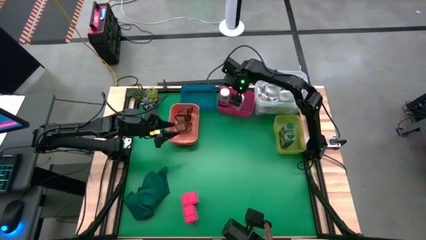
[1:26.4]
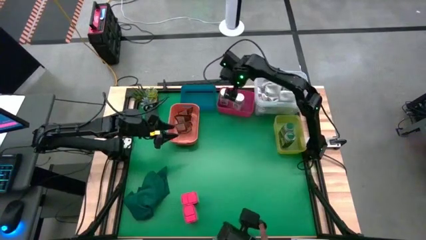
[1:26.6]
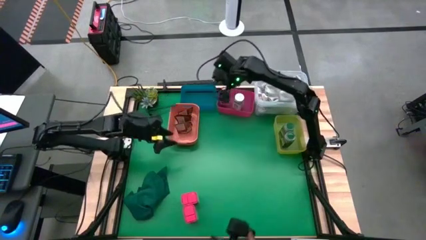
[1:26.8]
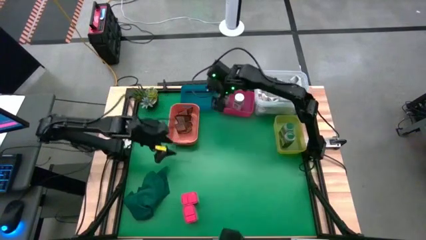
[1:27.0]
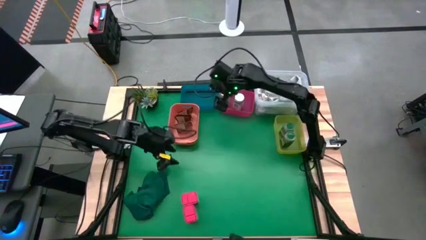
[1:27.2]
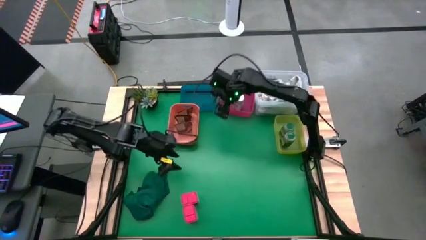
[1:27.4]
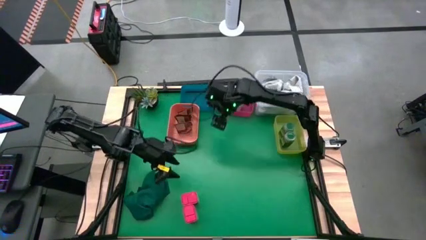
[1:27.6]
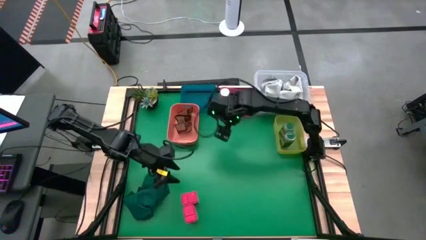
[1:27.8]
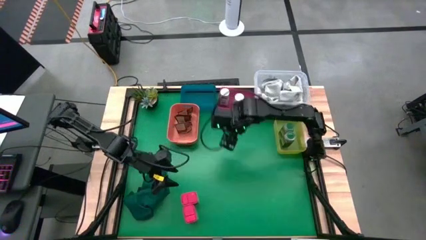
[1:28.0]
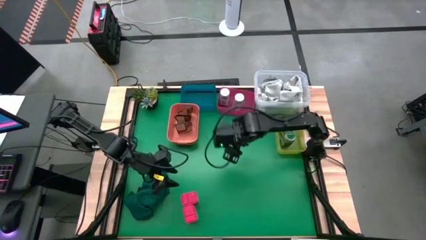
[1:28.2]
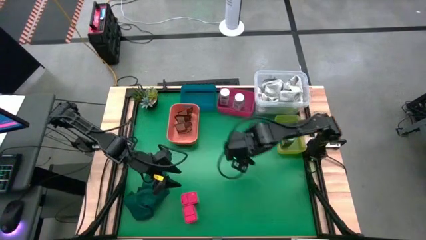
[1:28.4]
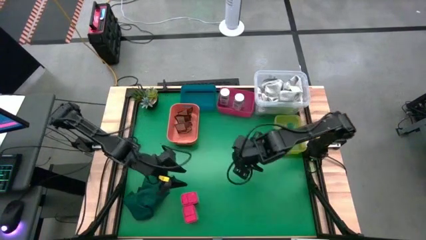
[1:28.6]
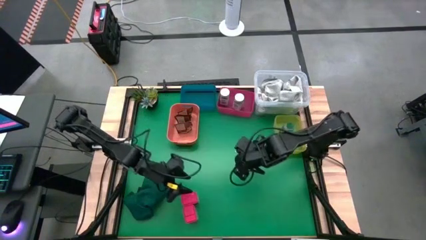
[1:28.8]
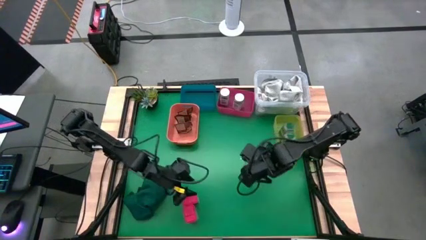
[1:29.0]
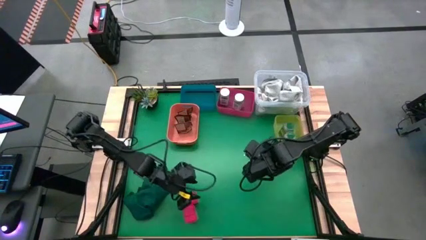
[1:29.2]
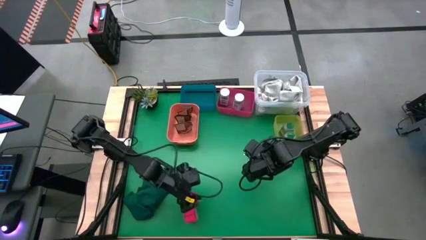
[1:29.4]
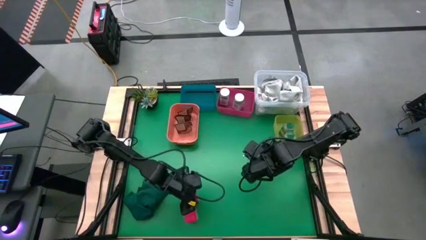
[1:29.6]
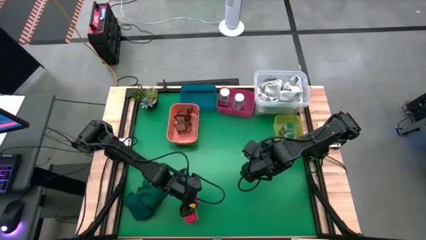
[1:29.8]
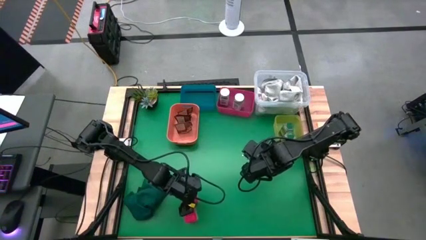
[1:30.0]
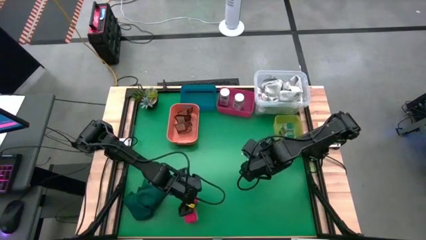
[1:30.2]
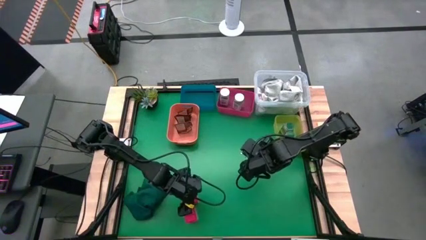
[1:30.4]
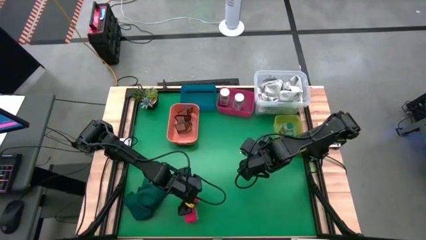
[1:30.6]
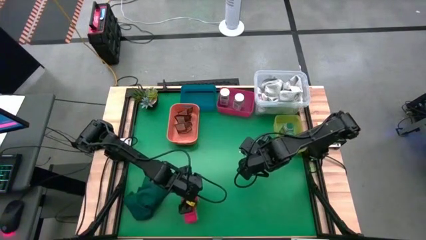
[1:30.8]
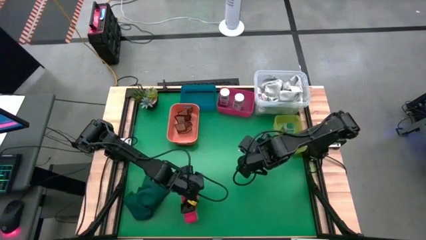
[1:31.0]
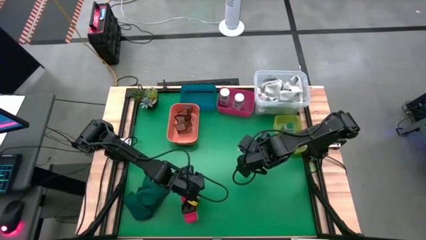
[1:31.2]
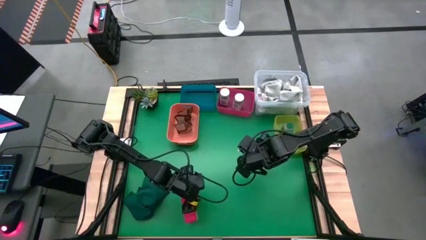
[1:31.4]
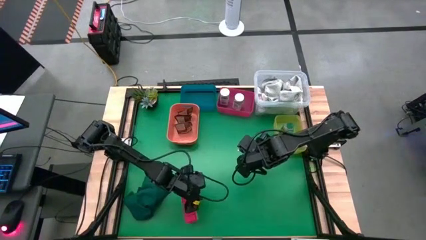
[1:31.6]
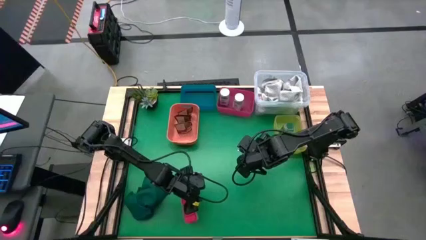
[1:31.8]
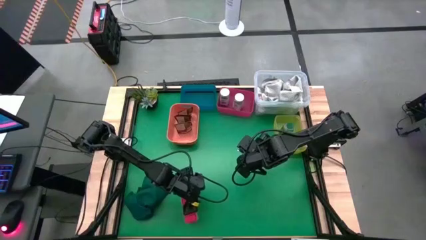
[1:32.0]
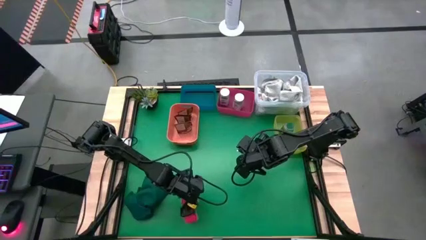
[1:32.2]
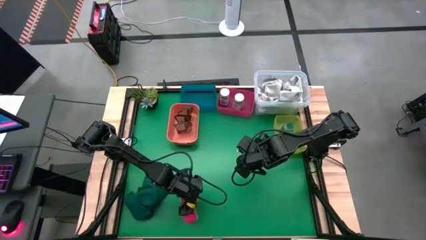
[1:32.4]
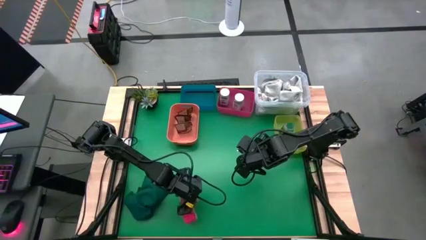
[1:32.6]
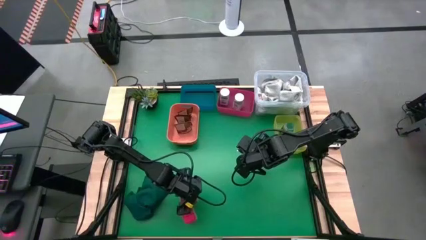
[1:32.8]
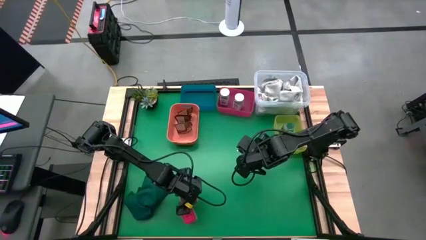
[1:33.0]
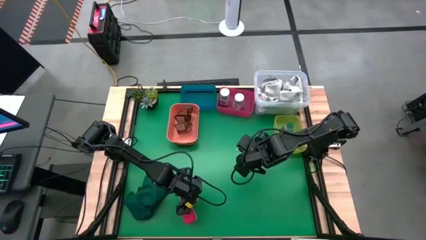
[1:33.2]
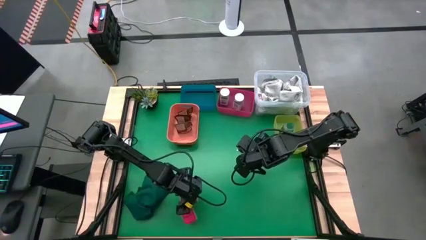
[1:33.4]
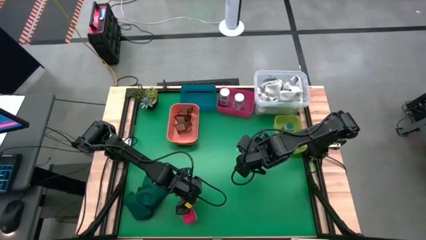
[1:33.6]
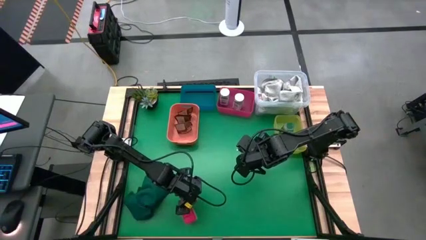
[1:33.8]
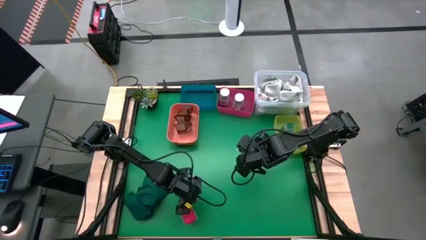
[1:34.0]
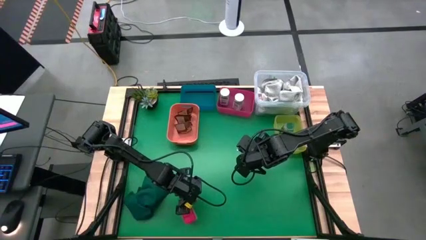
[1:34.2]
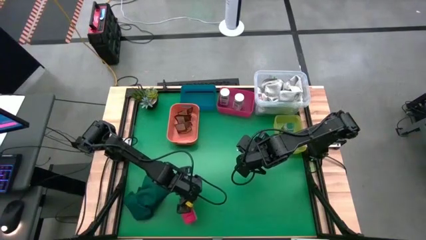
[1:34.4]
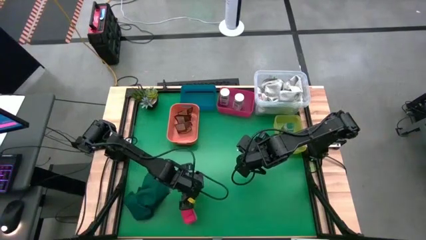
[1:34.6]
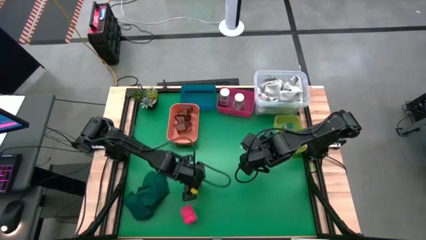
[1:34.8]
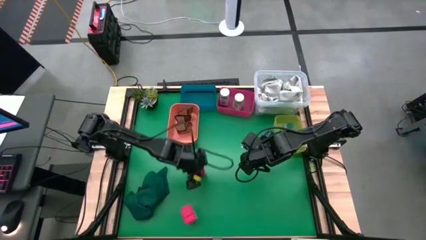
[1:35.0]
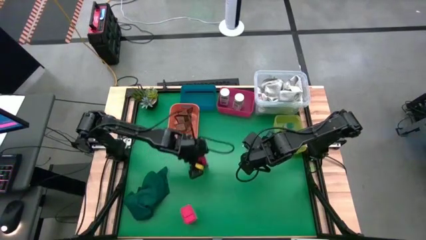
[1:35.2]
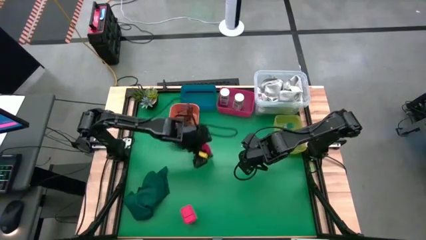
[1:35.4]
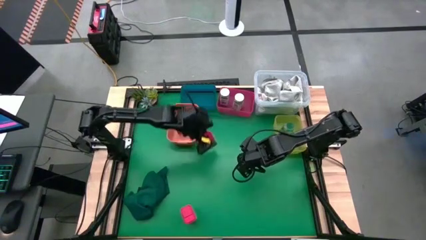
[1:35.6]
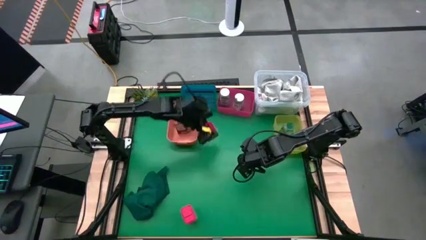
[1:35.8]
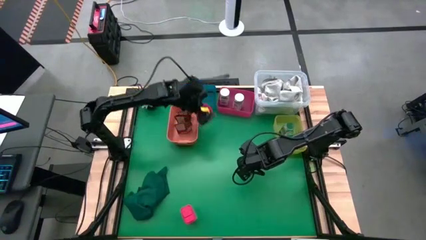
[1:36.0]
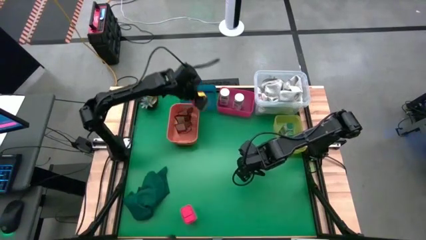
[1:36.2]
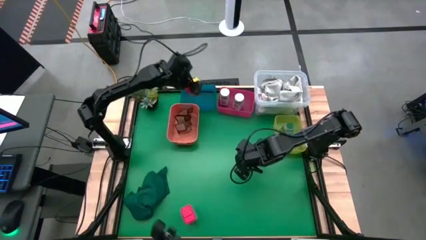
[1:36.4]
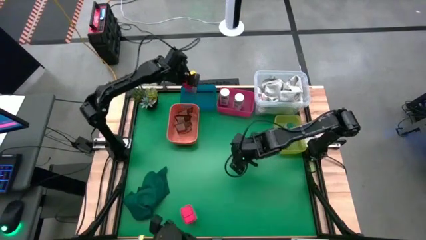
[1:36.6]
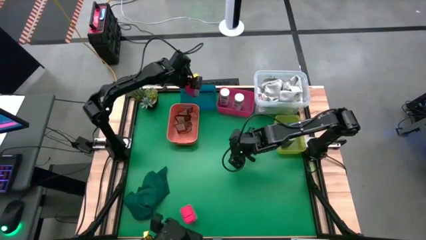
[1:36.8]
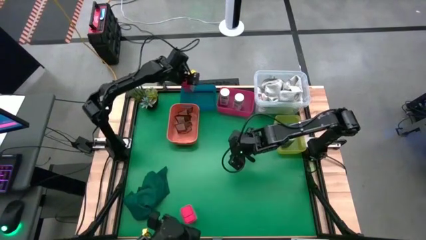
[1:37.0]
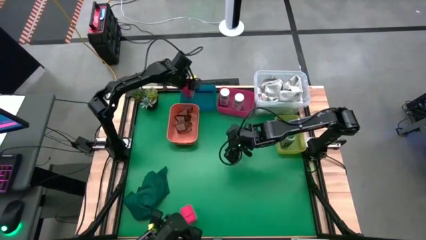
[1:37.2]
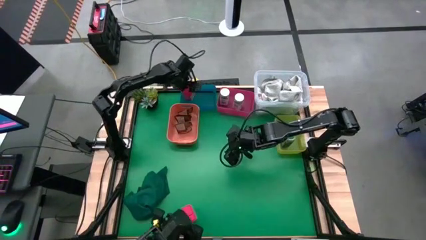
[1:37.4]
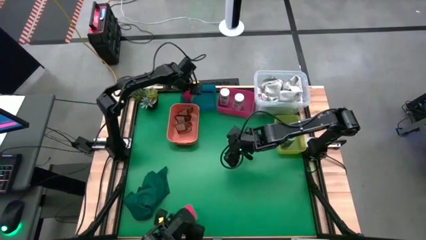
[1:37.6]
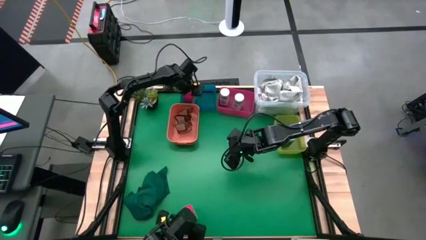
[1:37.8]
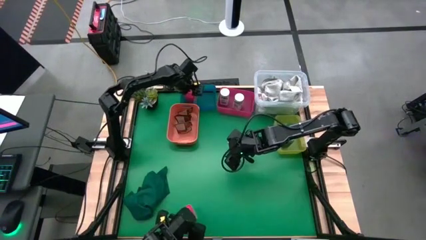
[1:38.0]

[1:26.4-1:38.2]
Task: Sort spices by type
Put the top red spice can into the blue bin

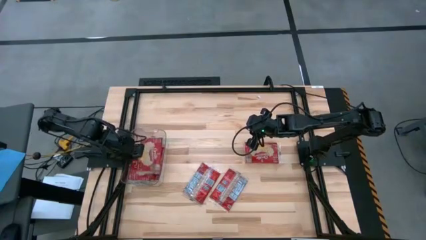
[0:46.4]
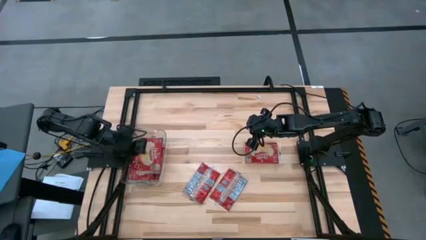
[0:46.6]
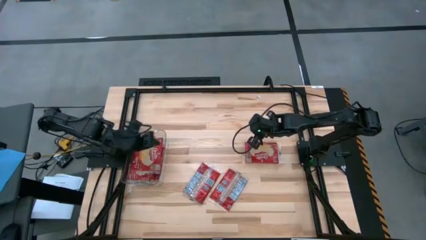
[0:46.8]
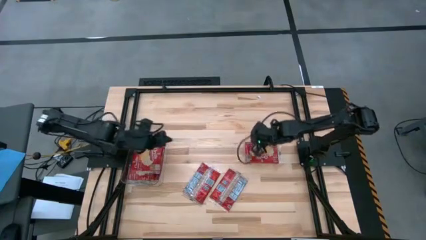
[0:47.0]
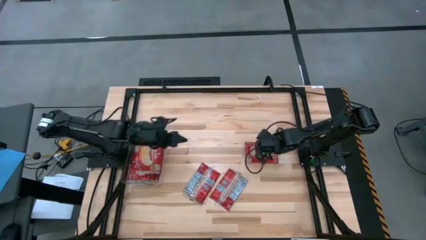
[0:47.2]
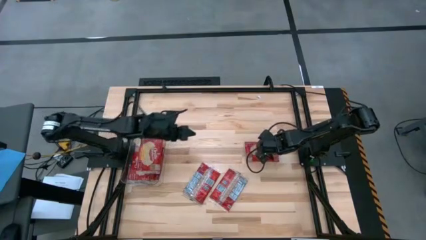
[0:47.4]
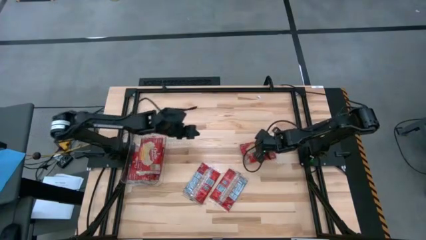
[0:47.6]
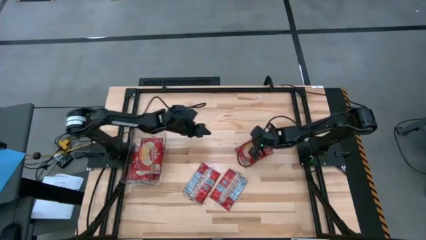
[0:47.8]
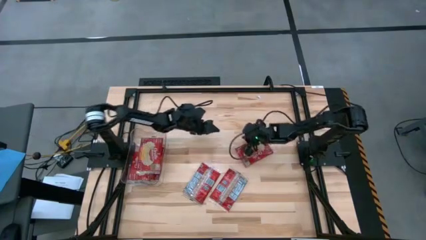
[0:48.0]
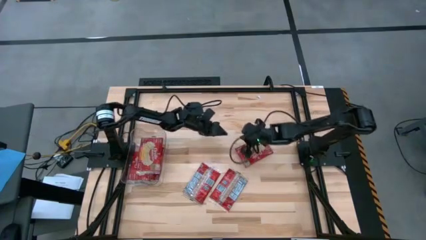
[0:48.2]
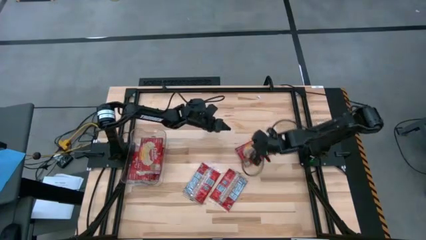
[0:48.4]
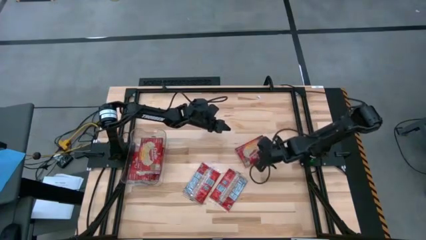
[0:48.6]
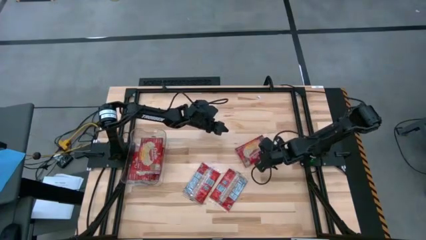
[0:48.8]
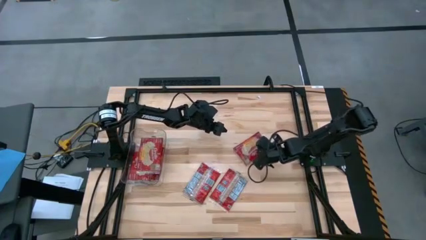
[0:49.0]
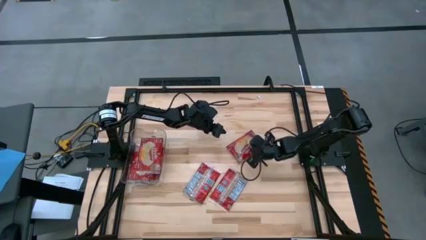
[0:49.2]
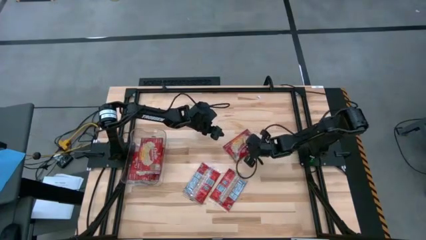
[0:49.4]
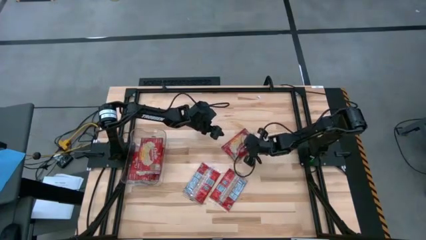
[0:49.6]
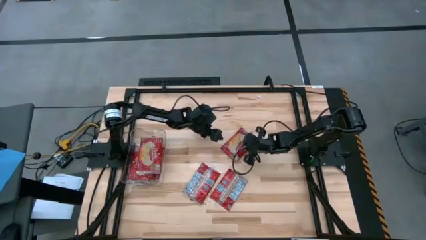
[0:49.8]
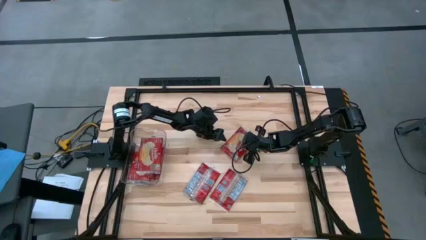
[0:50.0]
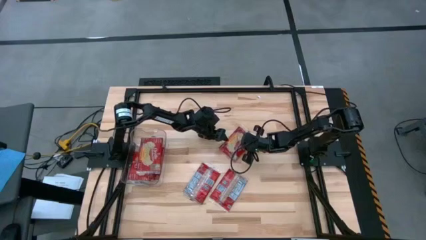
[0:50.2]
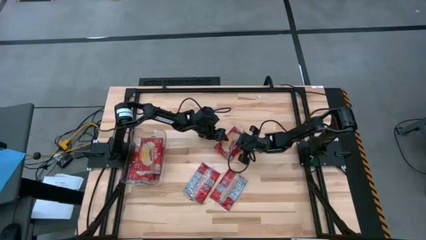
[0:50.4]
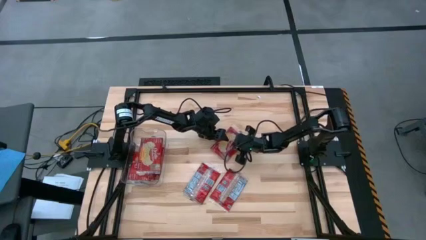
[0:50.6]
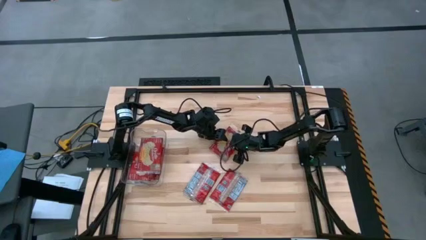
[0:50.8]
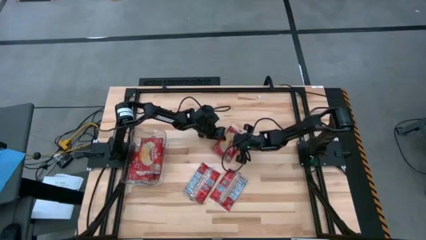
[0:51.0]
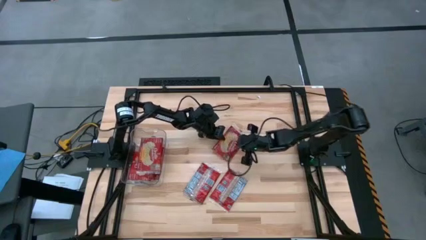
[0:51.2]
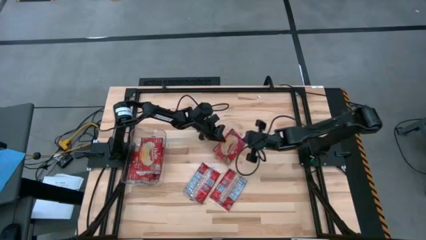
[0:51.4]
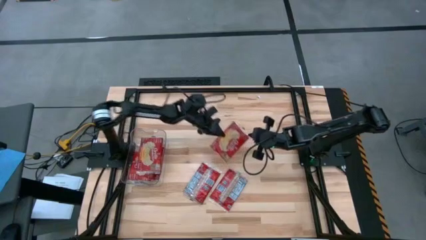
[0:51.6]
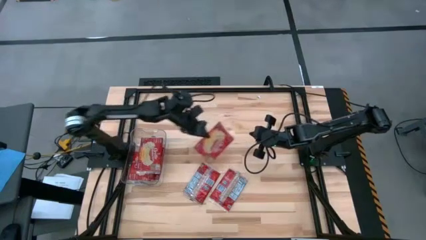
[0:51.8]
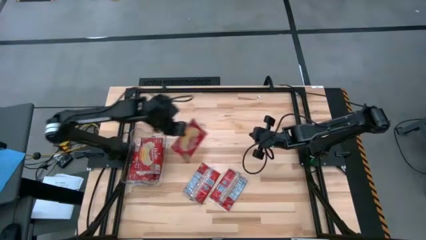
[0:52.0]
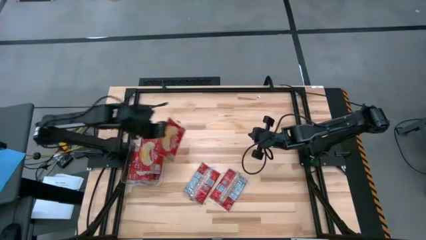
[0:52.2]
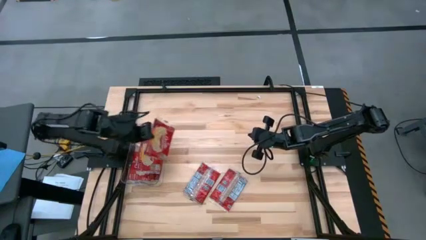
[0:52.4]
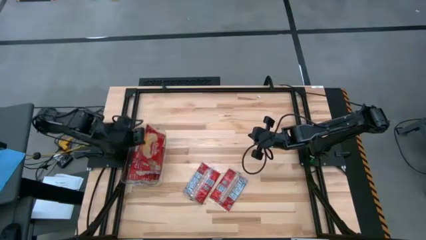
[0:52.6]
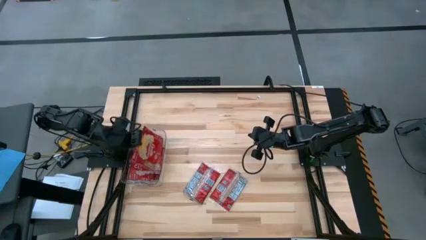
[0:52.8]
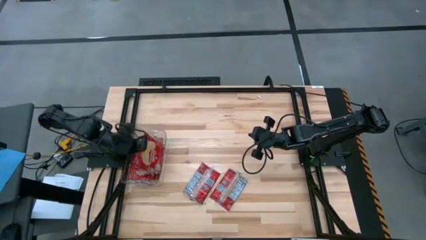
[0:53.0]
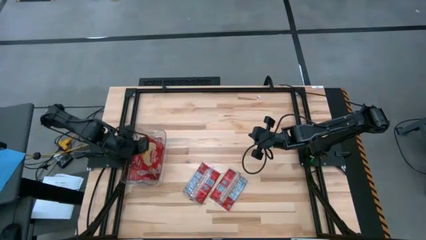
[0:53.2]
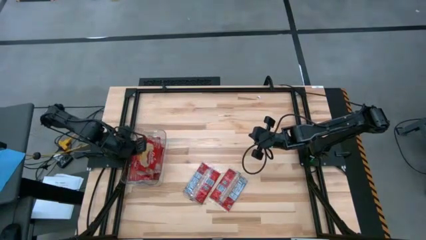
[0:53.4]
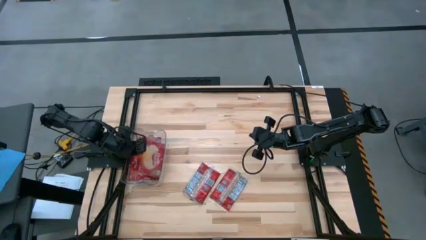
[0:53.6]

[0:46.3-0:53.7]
Task: Sort popcorn bags into baskets
Put the red popcorn bag into the transparent bin
